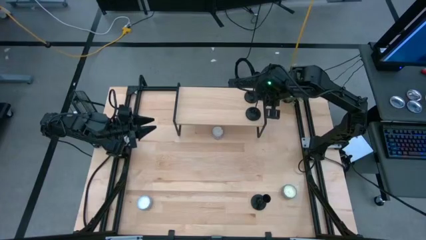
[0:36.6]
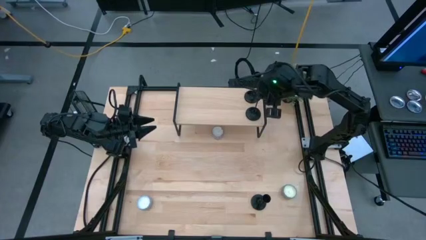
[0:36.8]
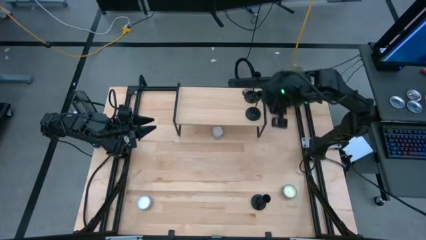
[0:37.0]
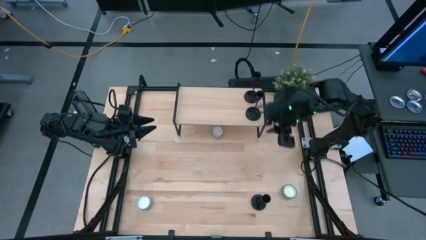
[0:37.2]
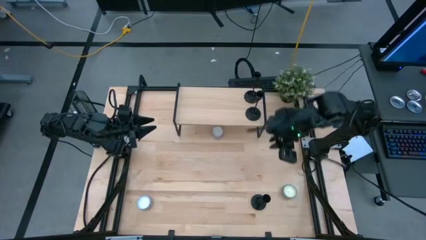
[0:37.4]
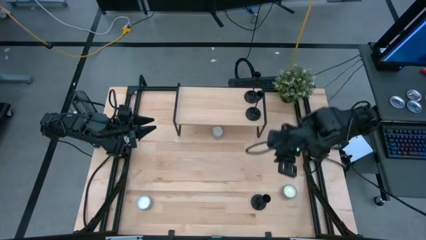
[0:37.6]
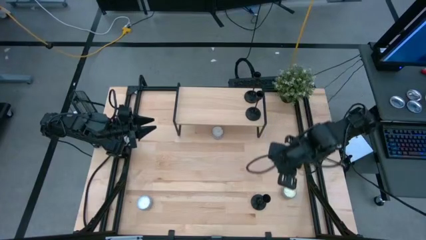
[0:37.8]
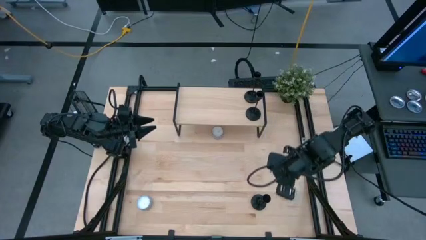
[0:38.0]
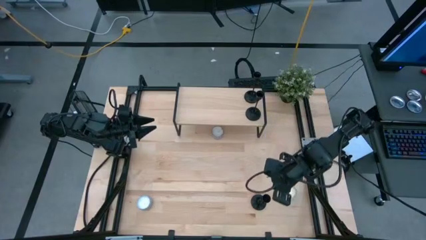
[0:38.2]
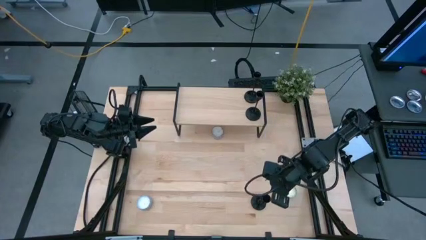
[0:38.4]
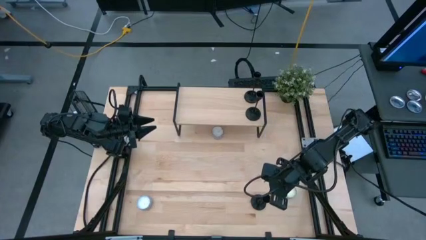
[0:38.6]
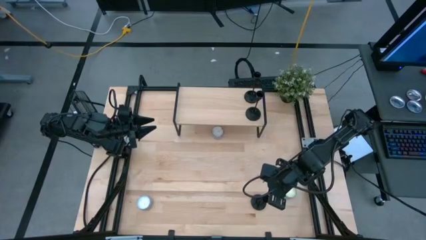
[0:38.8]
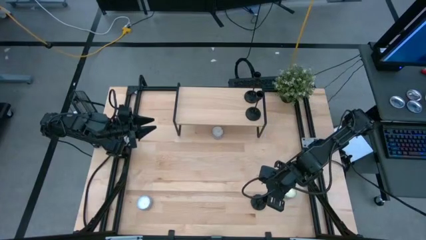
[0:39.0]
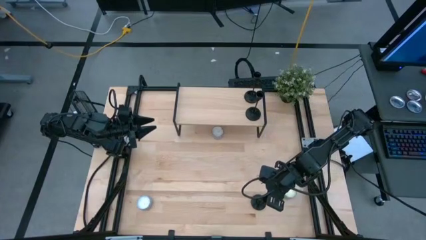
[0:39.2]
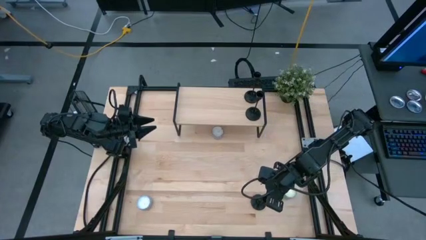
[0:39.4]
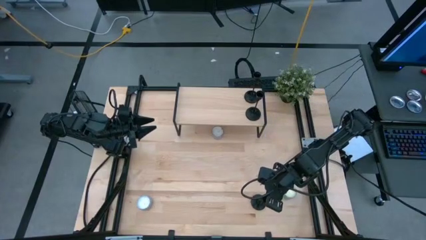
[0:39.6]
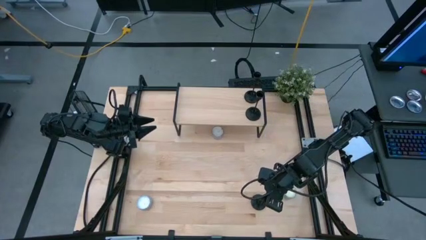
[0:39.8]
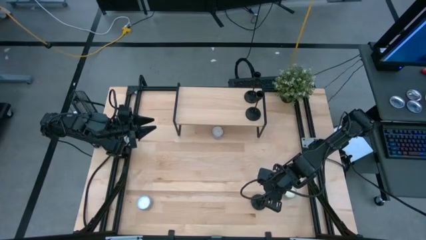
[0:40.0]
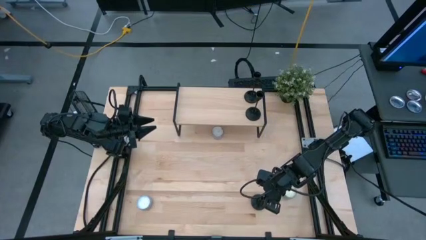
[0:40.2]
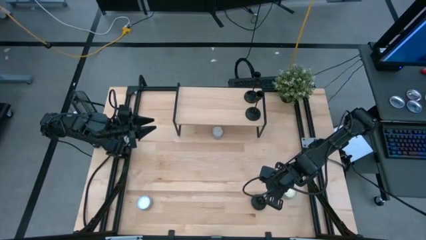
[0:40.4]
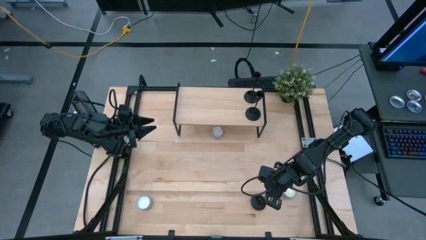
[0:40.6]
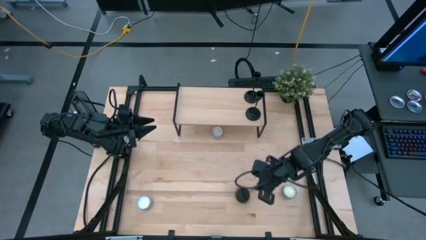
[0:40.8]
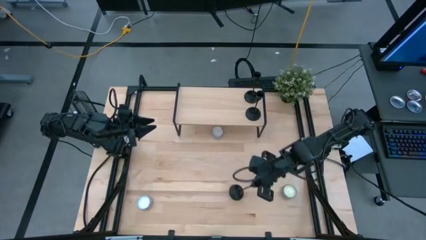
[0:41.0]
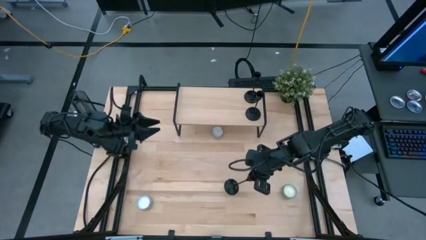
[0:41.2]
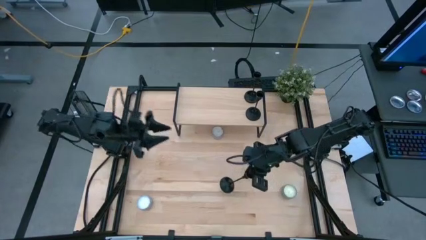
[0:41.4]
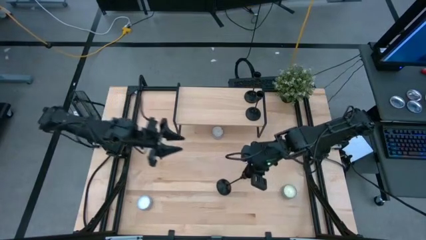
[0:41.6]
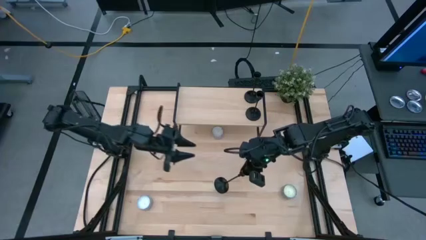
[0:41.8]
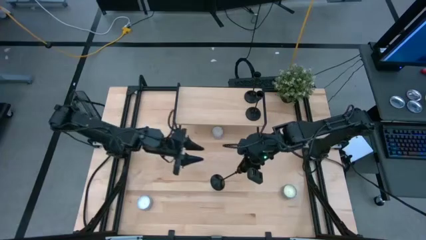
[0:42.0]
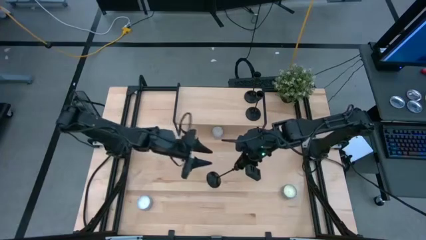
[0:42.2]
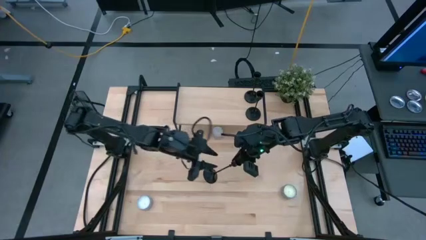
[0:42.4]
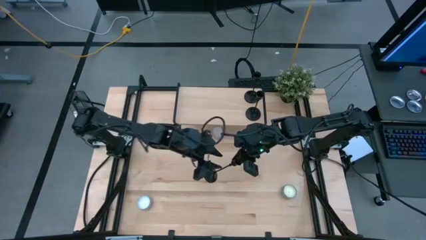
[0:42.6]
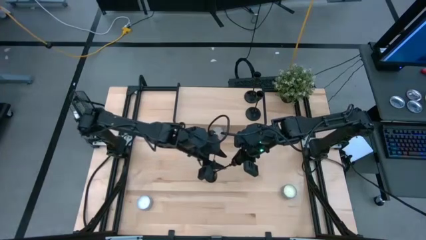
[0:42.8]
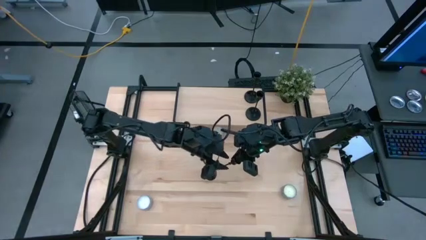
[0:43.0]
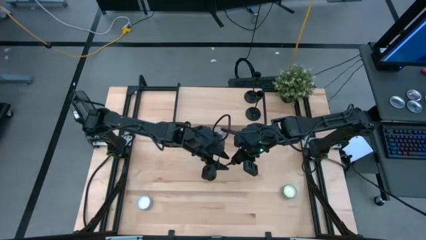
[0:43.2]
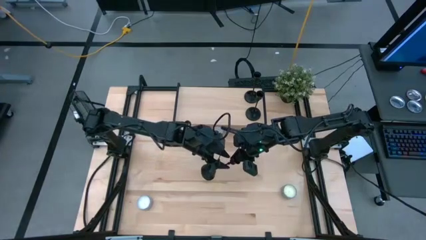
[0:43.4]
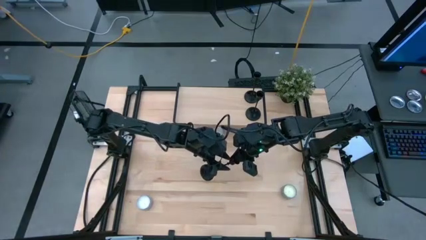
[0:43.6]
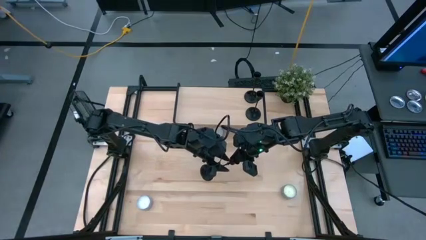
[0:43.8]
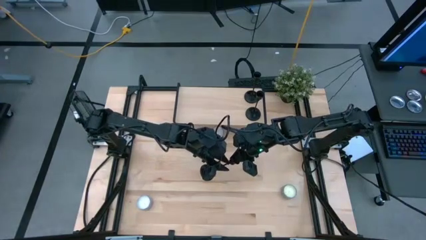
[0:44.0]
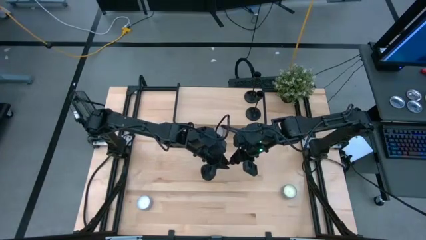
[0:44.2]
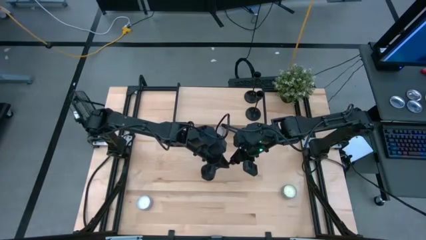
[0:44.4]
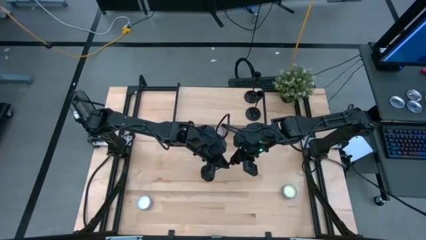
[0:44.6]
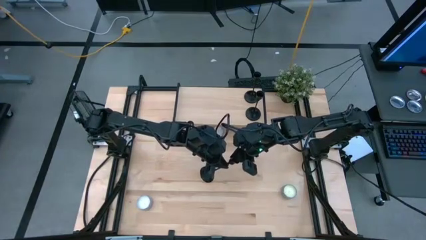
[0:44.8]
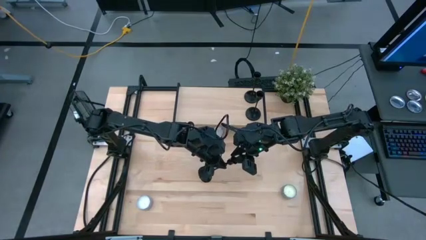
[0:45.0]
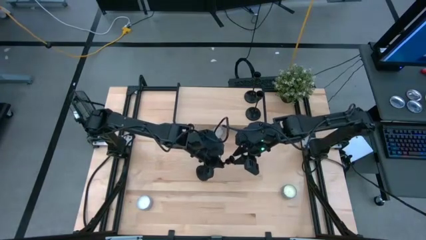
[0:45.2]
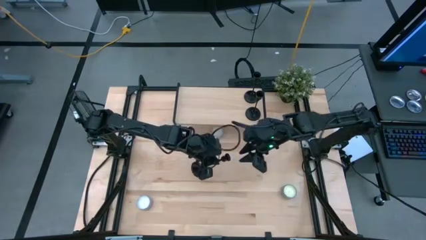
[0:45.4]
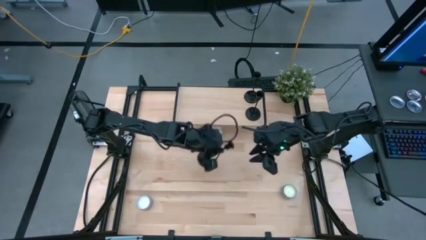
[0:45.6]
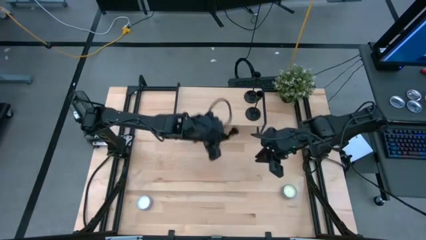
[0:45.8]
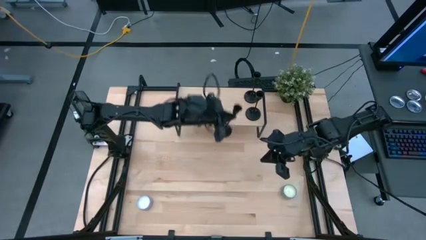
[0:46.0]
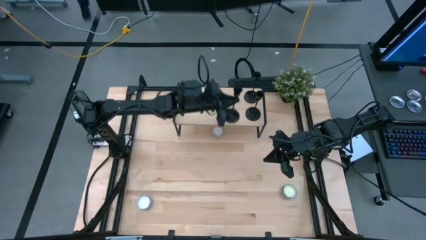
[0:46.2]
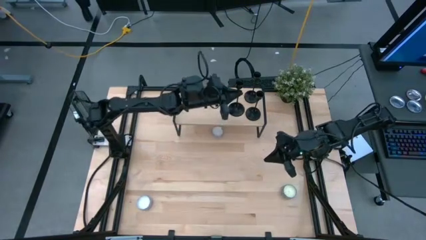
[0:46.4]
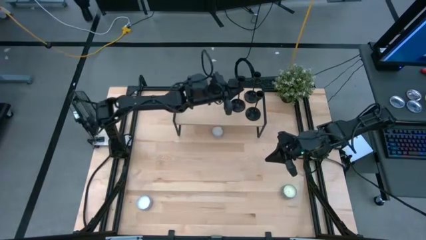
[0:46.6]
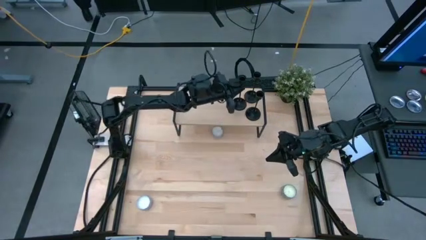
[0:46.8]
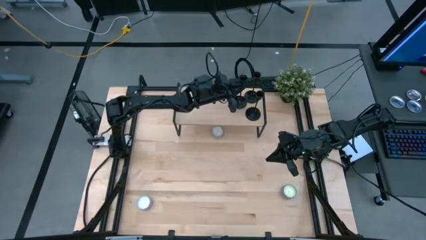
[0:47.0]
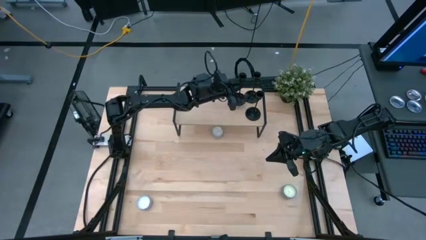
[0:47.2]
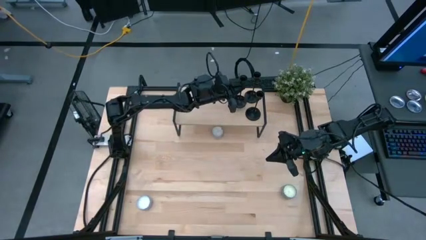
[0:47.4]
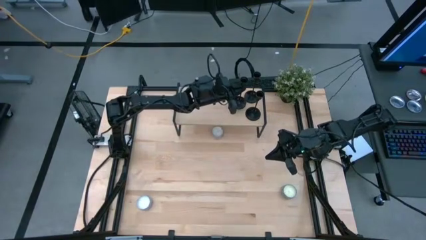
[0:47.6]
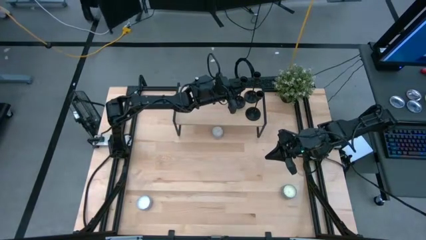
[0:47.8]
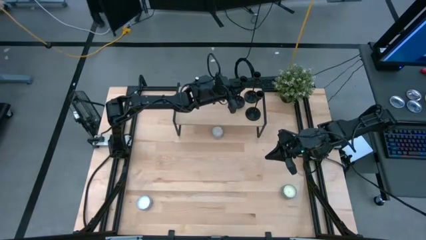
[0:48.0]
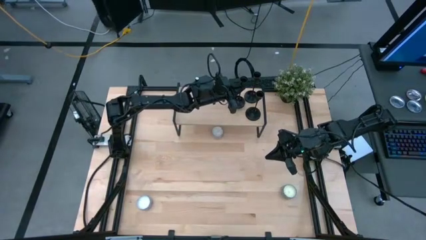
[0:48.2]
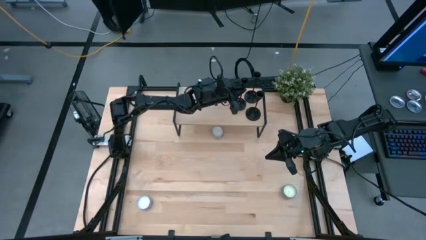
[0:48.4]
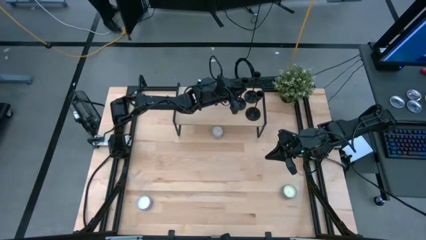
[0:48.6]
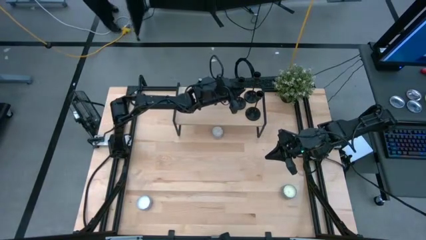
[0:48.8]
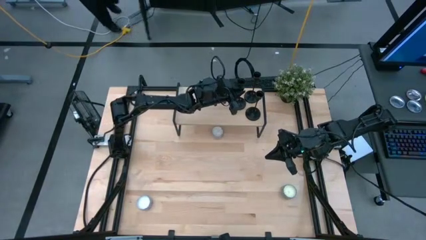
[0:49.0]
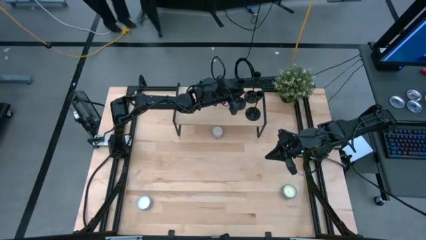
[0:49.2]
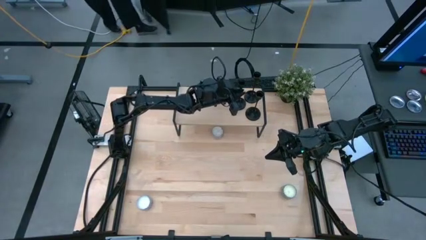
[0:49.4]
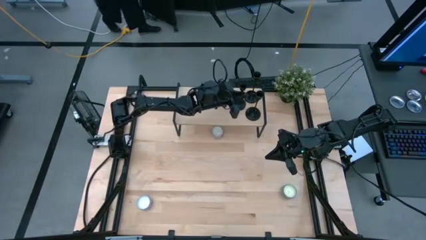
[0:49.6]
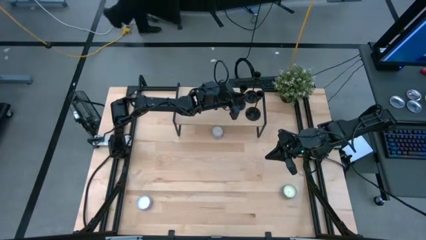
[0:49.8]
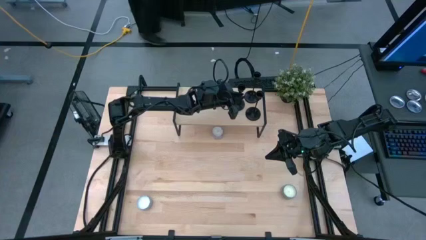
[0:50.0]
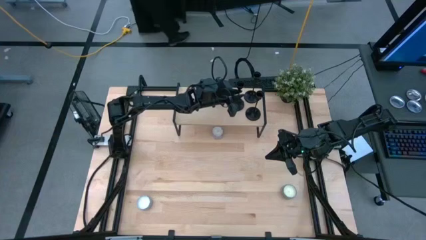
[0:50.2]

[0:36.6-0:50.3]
Task: Pick & Place candle stick holders
Put the black candle holder on the shelf

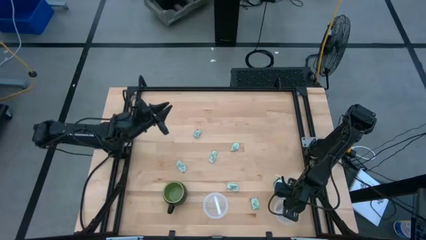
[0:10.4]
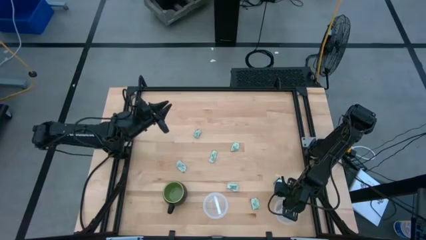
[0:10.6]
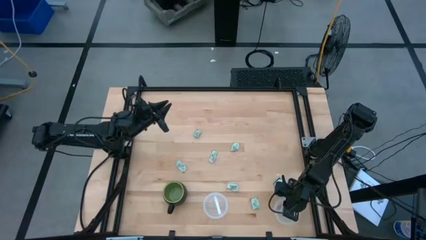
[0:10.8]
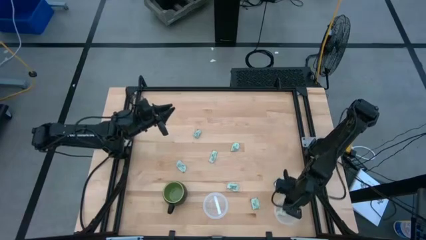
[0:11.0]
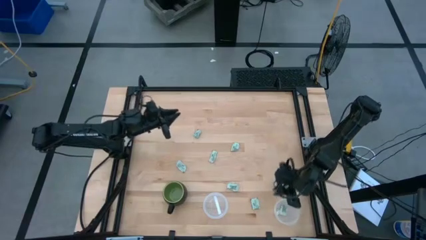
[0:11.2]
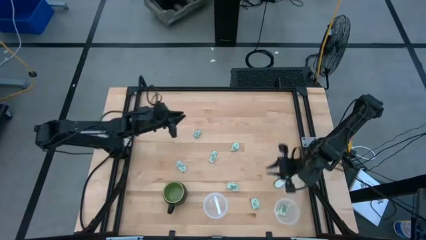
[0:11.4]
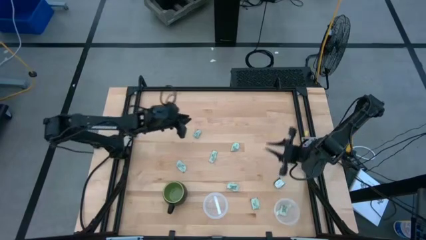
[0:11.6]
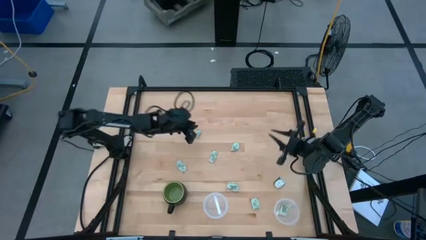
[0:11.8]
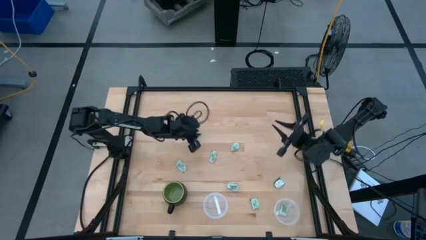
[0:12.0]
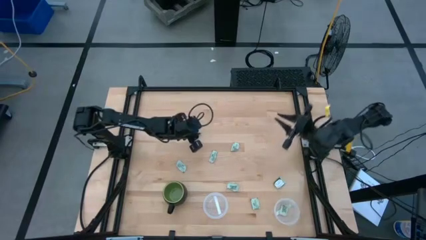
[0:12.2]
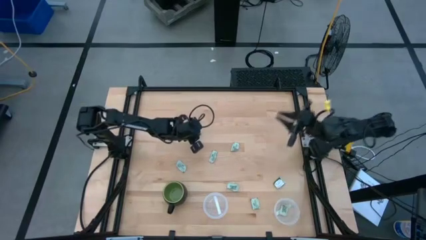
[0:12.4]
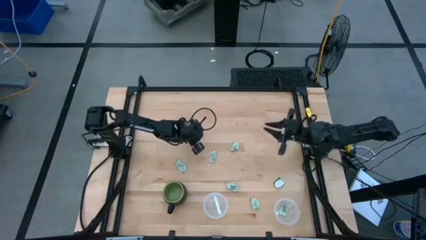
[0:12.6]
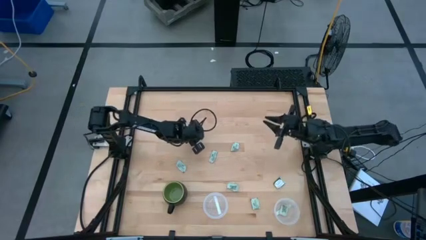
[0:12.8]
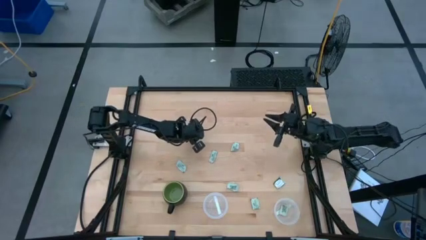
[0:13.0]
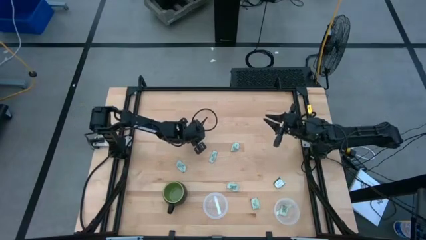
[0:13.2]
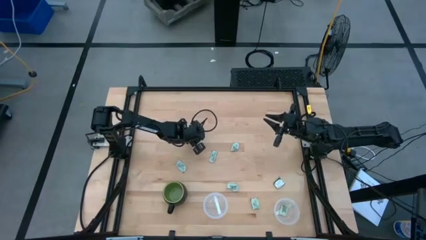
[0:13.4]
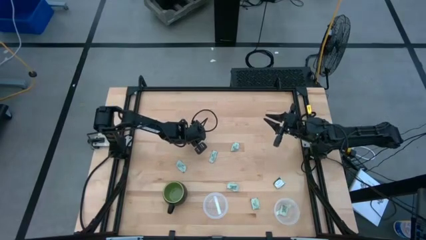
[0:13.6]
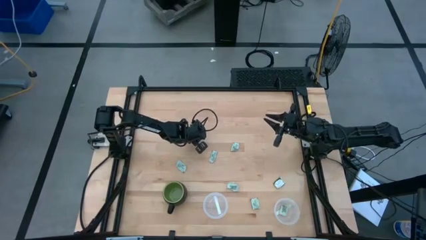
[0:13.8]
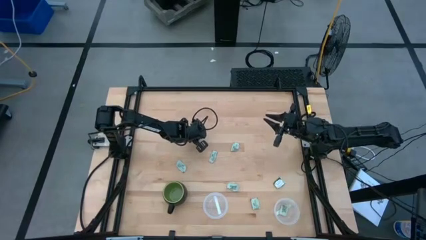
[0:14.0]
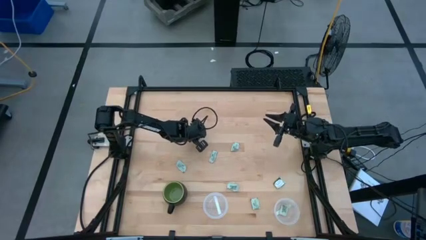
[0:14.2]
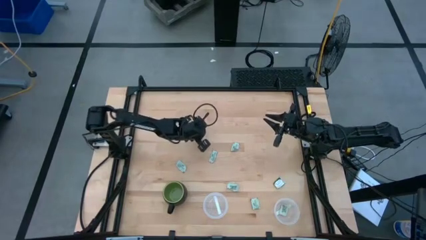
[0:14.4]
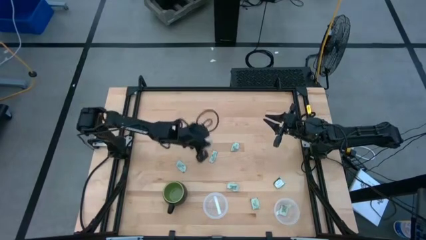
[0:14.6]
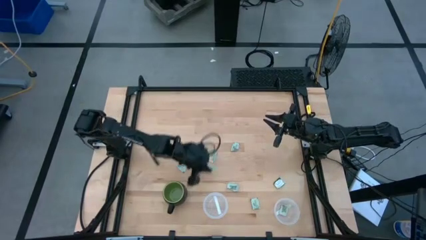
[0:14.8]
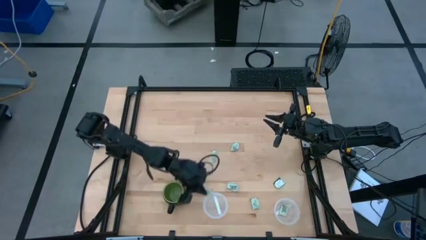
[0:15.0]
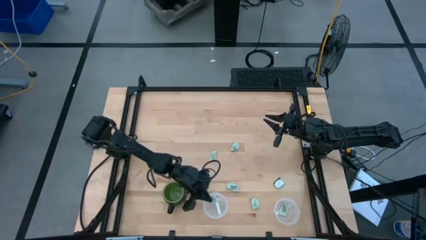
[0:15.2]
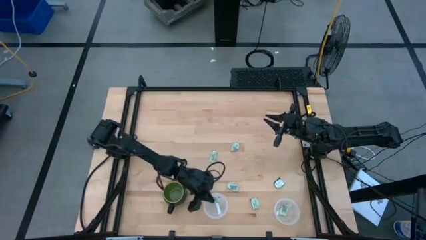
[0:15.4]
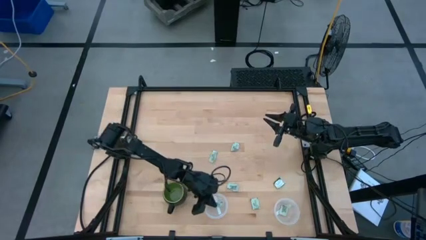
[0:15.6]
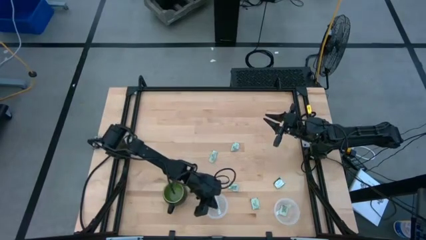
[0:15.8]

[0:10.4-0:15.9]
Task: Pick and place Stevia / Truvia into bins
Put the green stevia packet into the left transparent container
